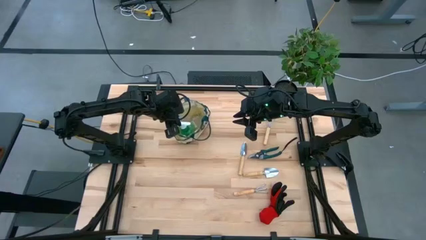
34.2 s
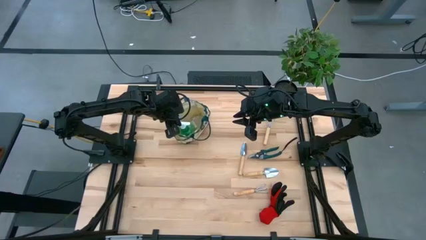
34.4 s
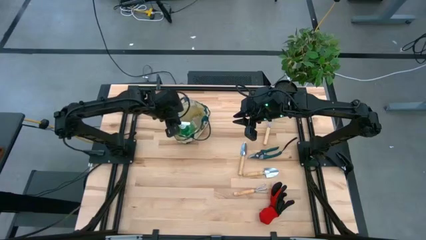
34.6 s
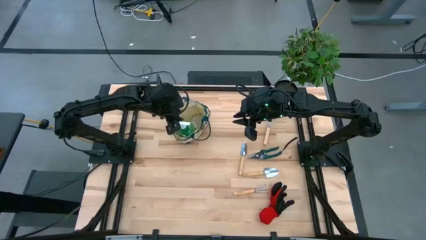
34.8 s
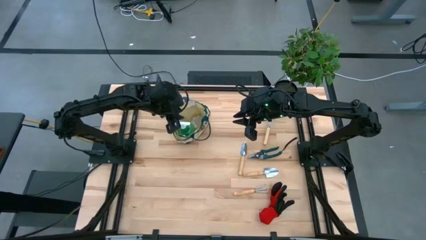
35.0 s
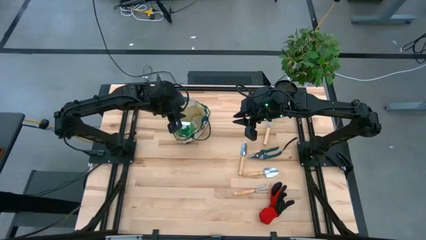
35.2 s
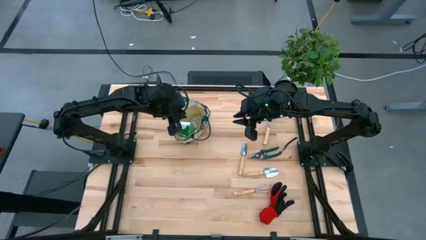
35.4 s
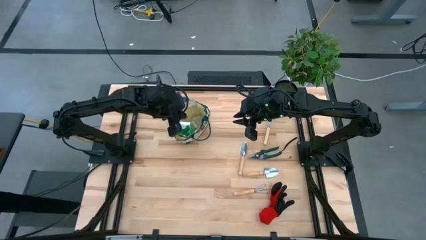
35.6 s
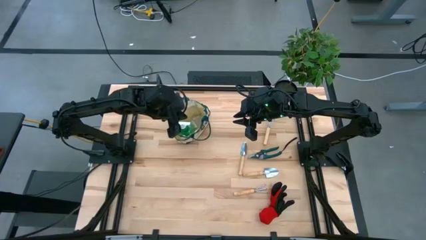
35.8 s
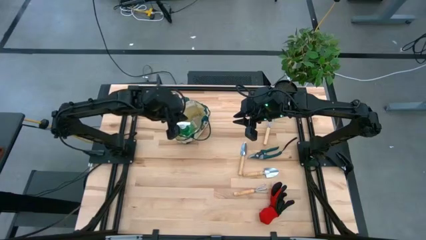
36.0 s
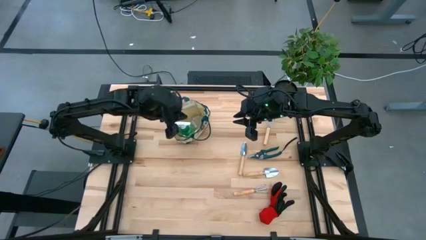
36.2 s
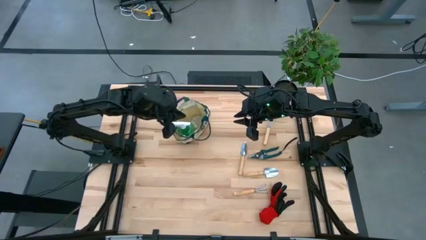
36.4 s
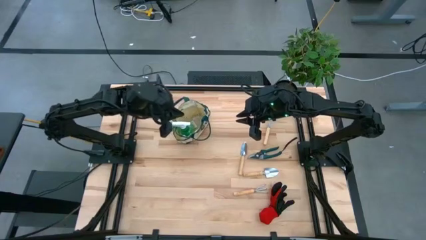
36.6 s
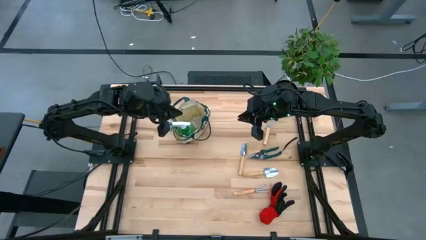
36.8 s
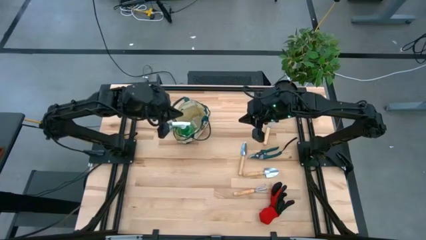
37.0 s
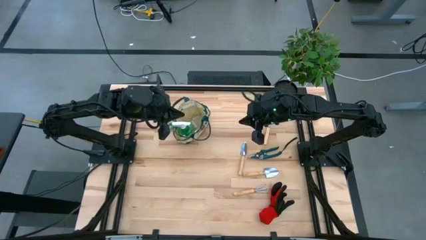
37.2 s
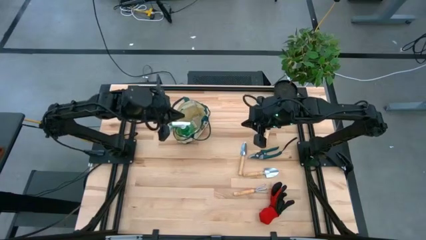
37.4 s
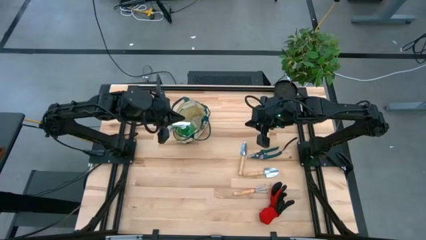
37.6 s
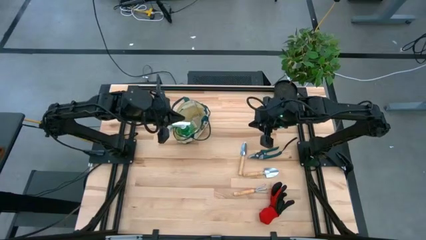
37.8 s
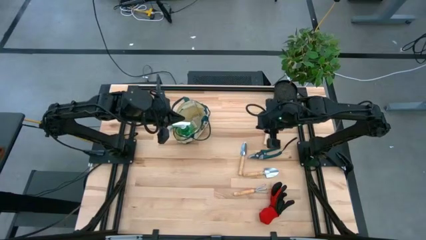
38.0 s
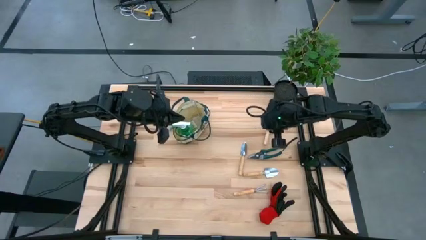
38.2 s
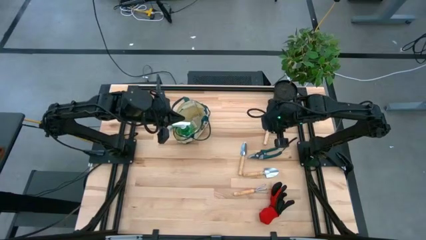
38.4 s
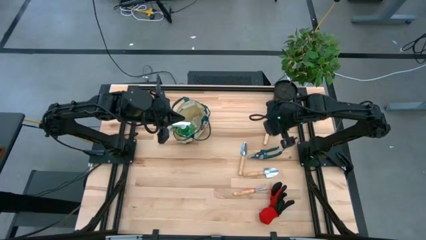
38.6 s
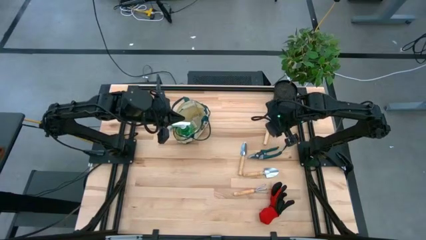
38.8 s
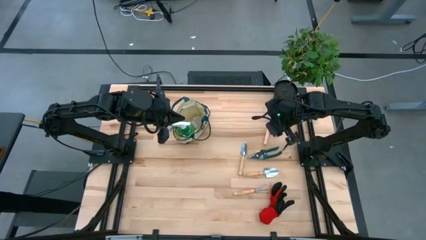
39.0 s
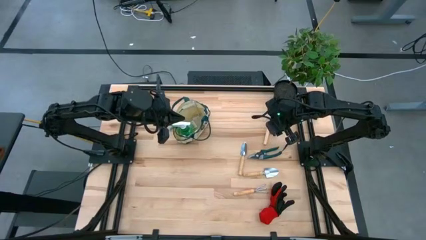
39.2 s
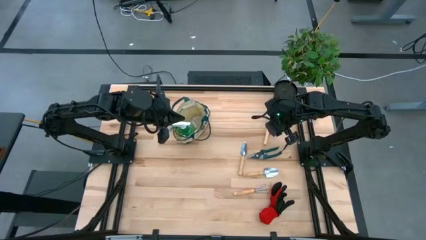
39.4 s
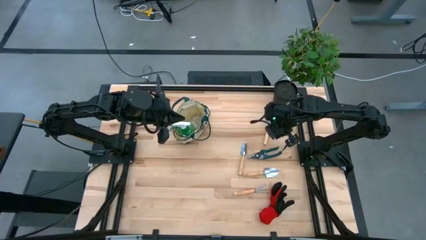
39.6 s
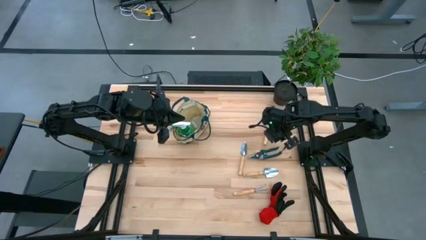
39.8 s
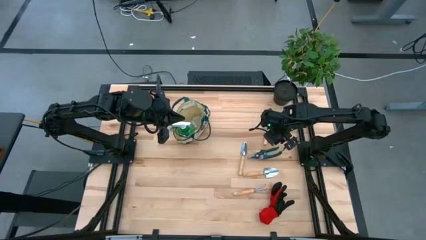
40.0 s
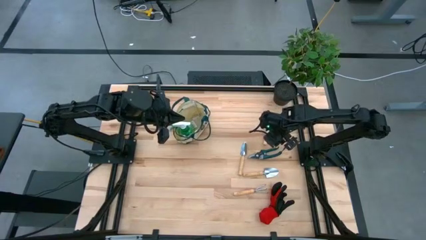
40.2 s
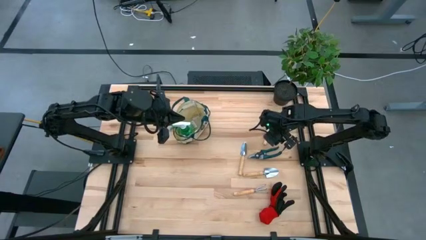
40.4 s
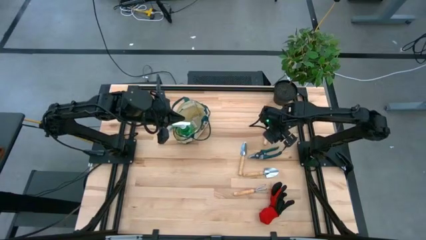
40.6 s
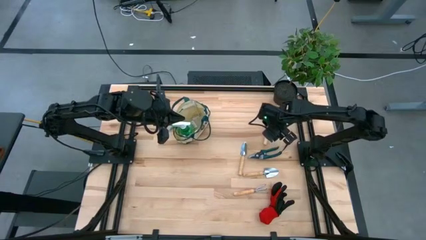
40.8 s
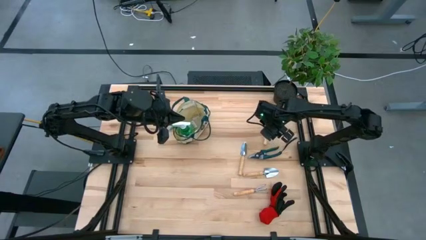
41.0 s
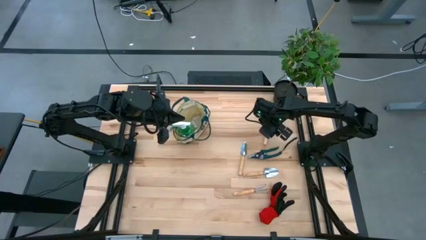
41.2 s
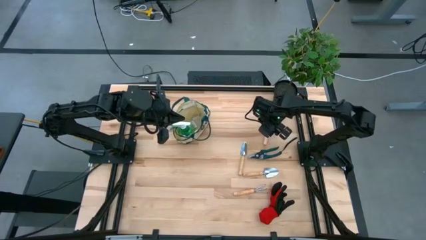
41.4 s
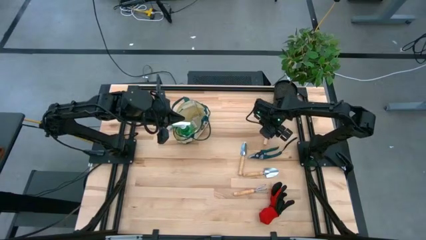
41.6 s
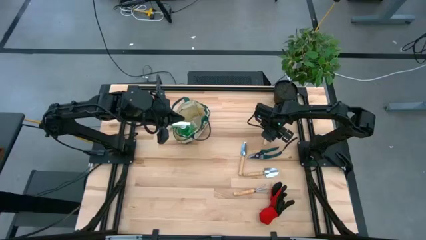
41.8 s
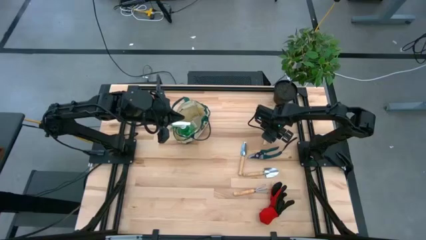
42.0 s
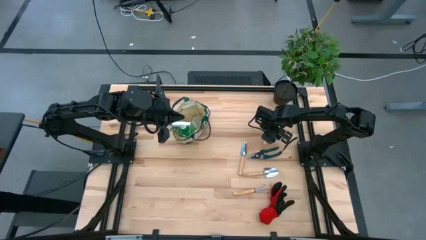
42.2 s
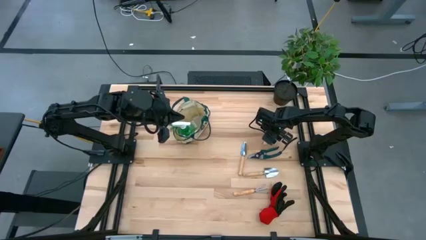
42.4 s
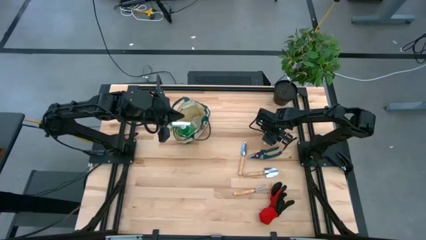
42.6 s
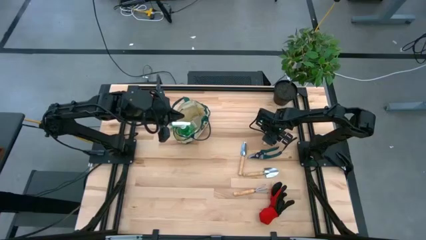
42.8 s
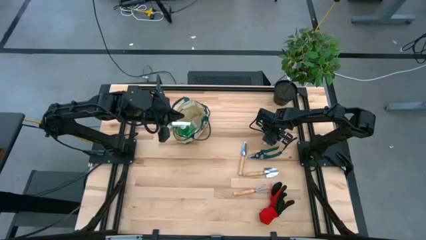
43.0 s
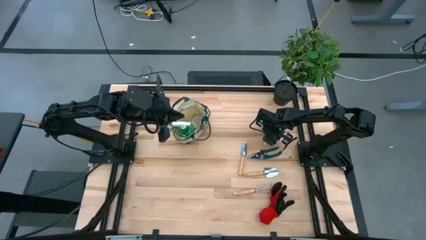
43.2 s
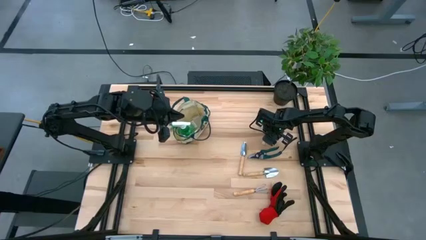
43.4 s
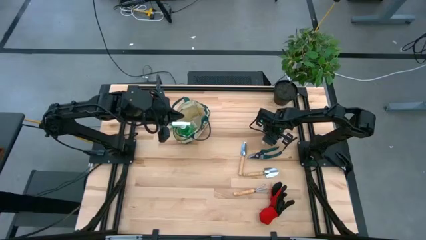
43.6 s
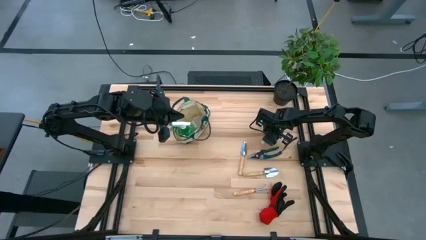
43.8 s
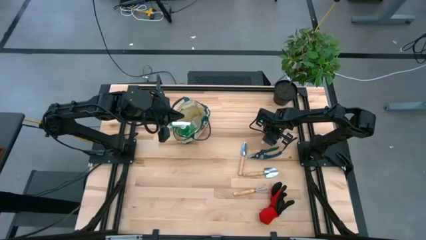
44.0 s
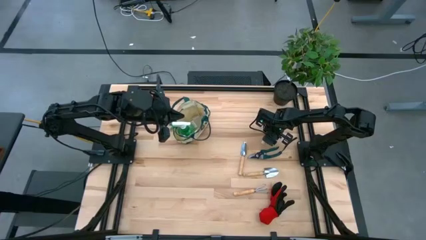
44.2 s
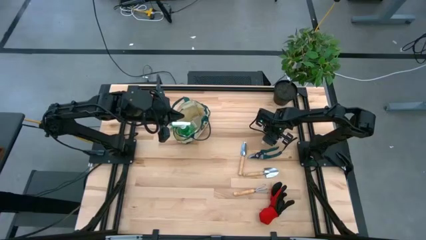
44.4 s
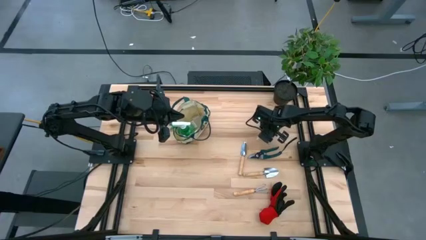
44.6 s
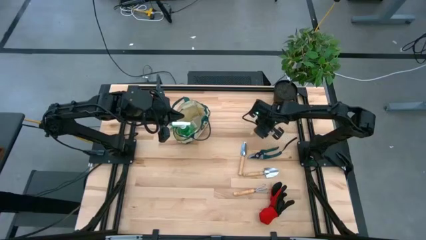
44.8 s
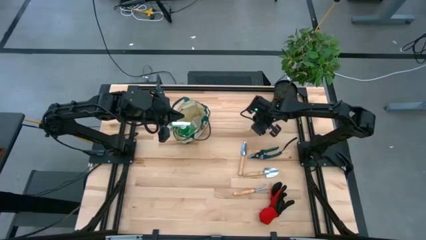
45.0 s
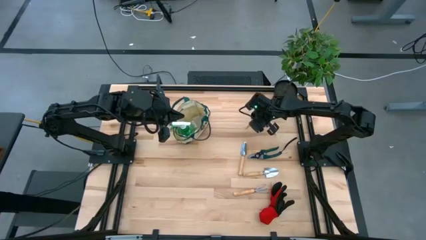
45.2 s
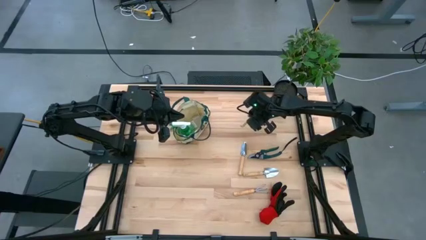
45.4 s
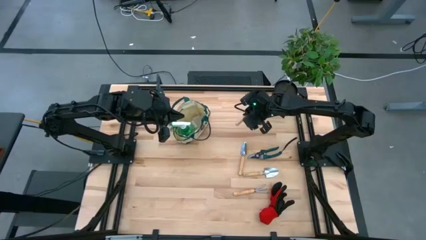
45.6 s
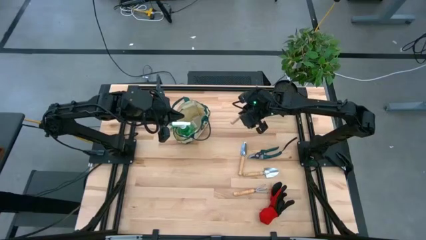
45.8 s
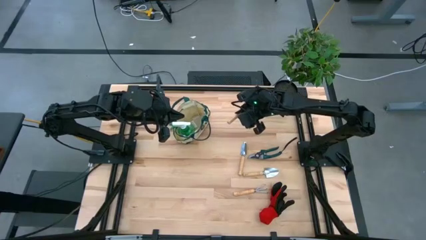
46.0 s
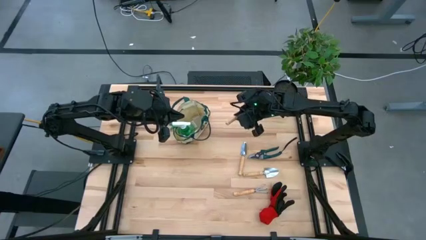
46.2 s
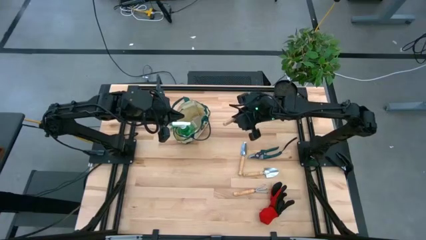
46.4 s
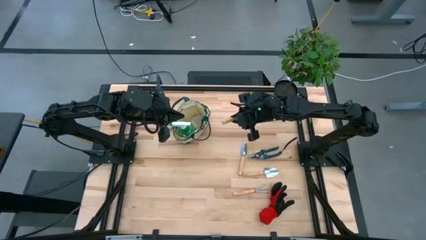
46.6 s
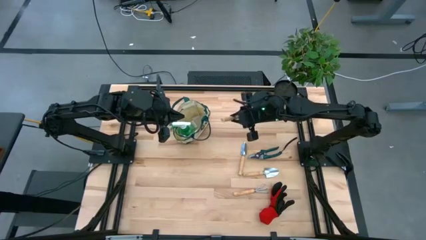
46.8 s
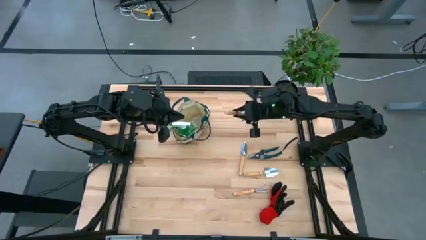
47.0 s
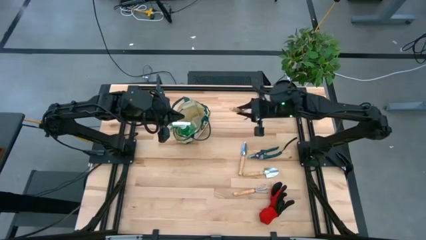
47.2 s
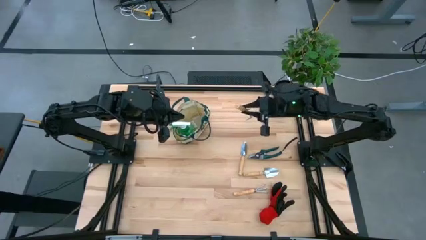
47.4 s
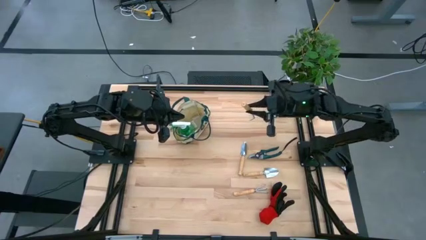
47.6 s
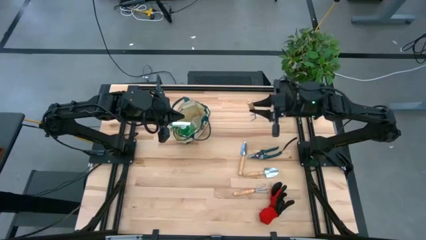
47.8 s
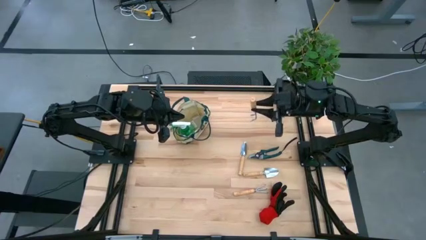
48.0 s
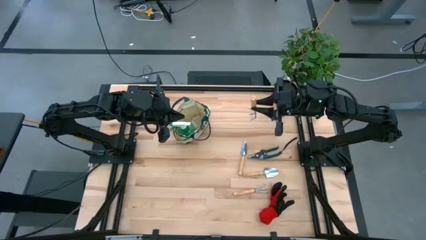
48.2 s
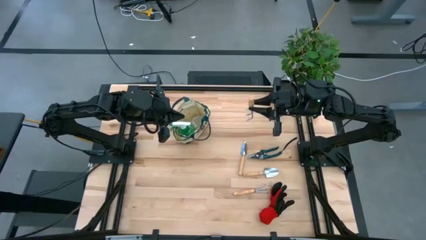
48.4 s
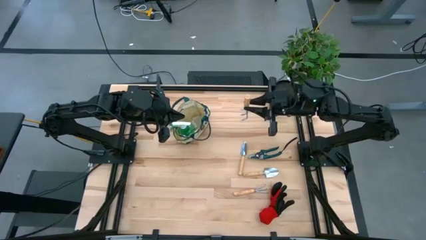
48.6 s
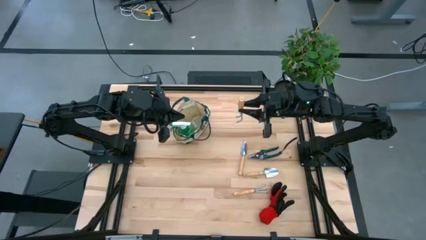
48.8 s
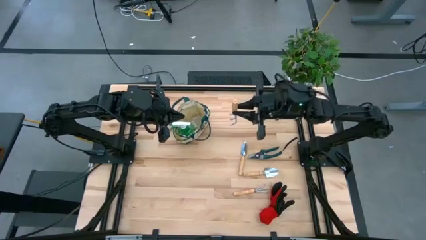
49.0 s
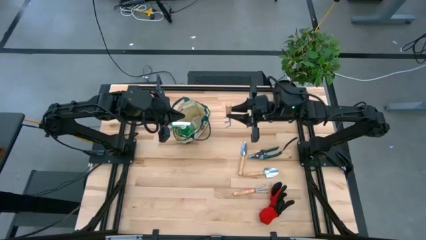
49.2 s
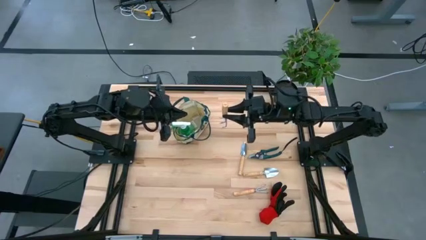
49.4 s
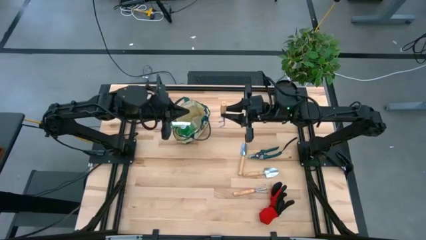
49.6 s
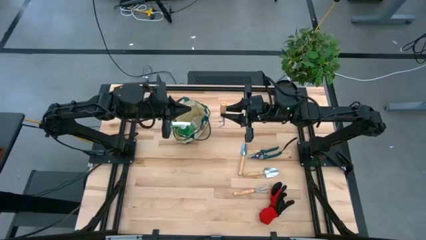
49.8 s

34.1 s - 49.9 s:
Task: Pick & Place Garden tools in Gardening bag
Put the top brown hand rake into the gardening bag
